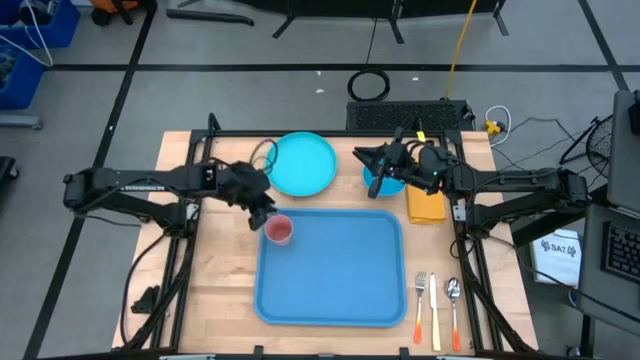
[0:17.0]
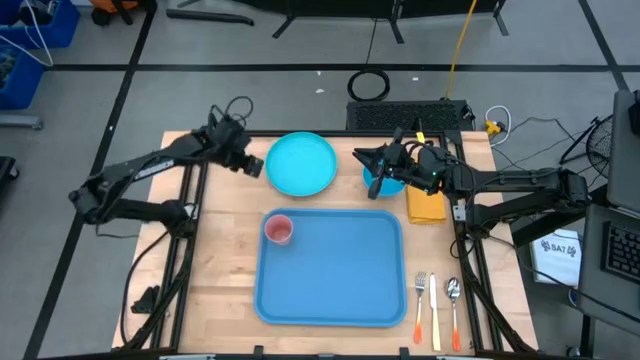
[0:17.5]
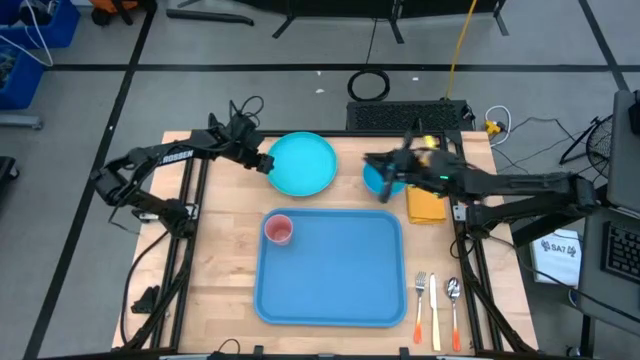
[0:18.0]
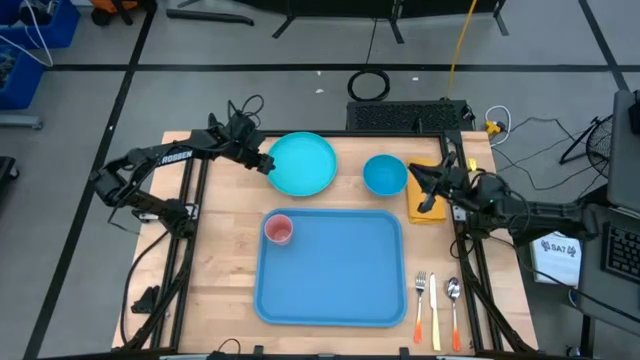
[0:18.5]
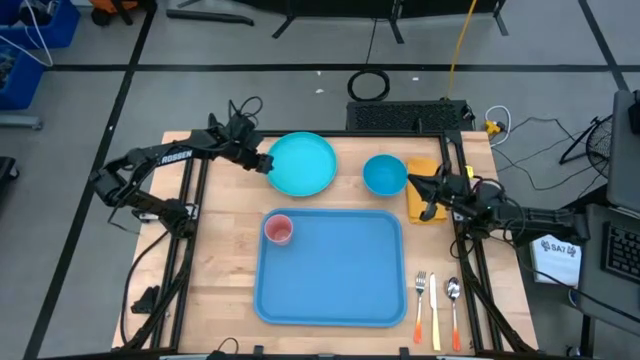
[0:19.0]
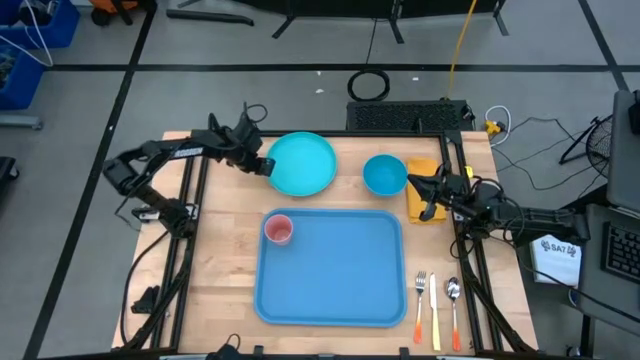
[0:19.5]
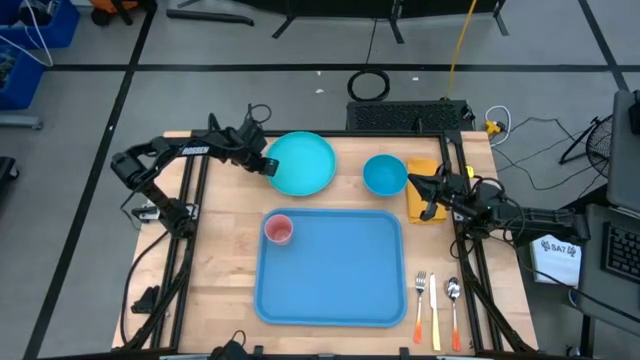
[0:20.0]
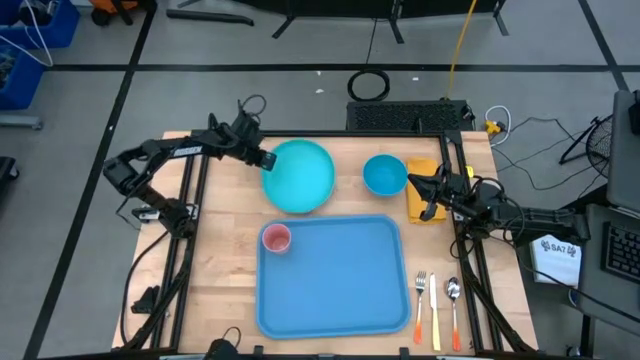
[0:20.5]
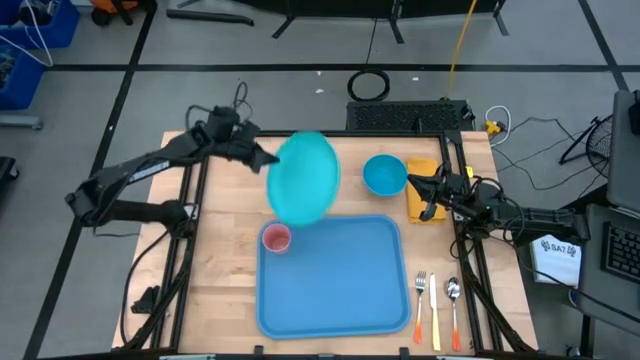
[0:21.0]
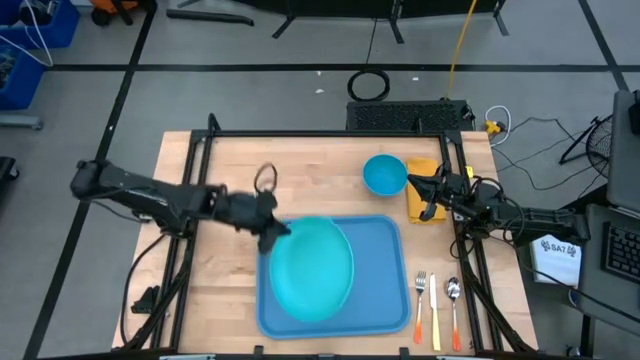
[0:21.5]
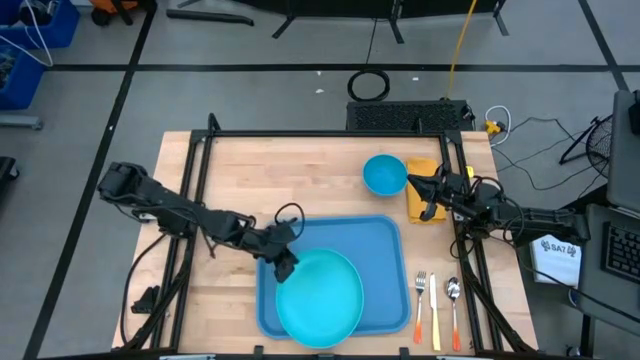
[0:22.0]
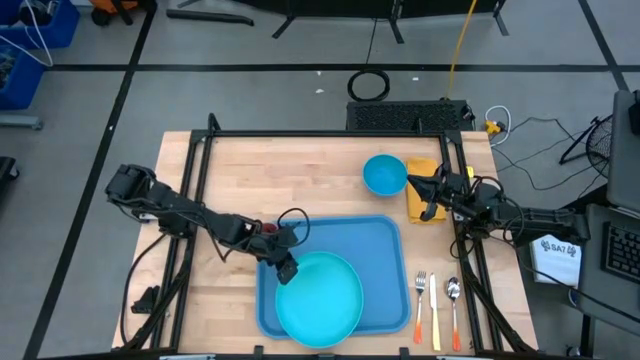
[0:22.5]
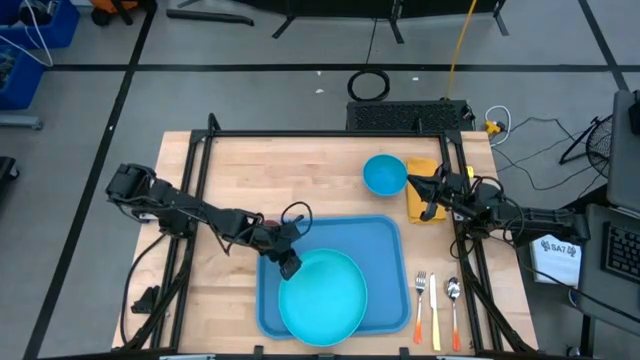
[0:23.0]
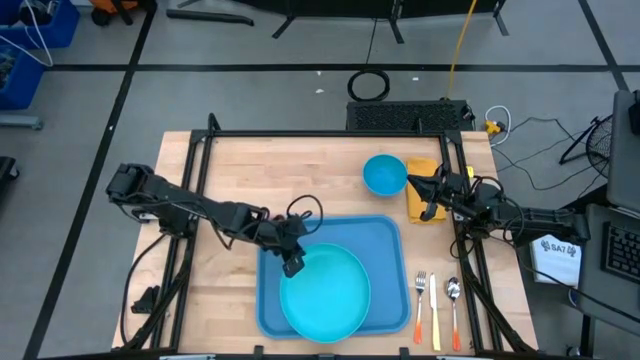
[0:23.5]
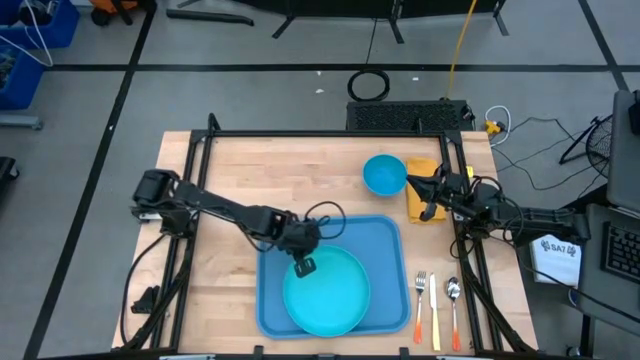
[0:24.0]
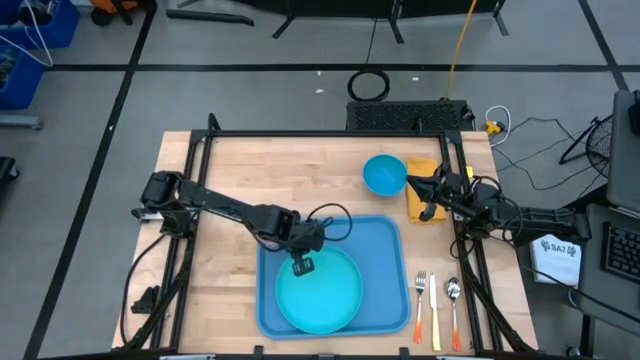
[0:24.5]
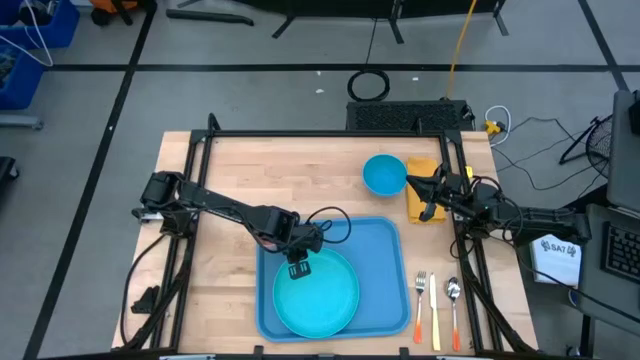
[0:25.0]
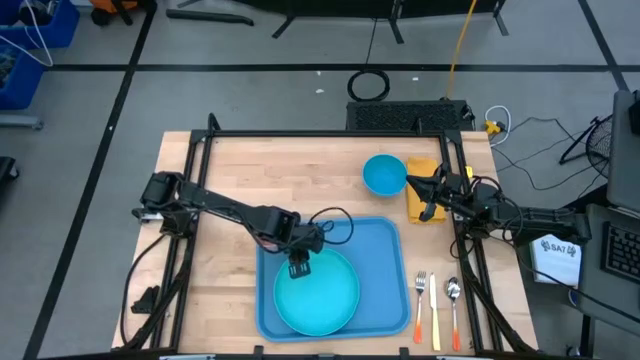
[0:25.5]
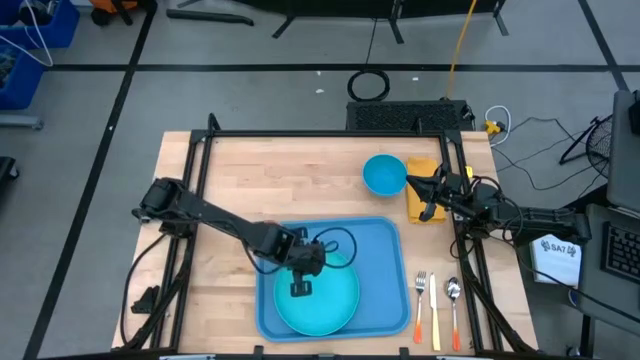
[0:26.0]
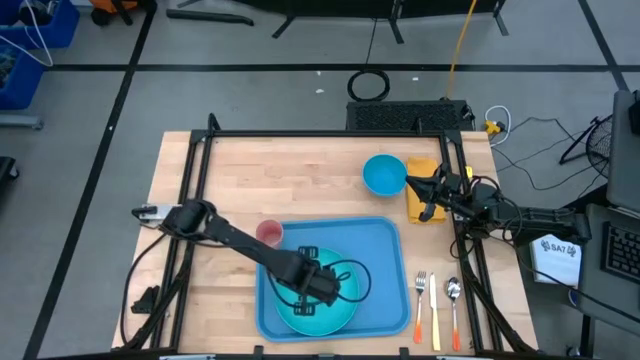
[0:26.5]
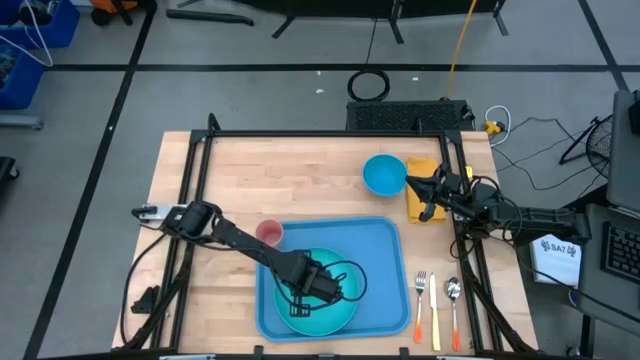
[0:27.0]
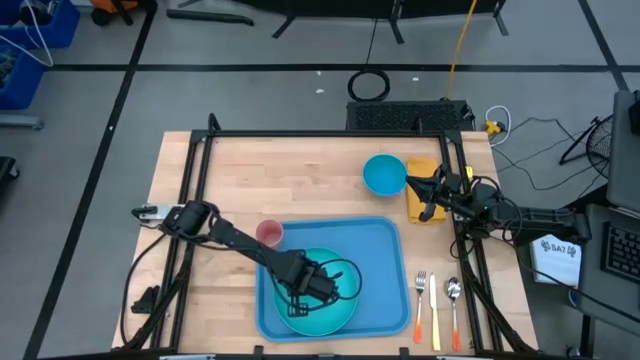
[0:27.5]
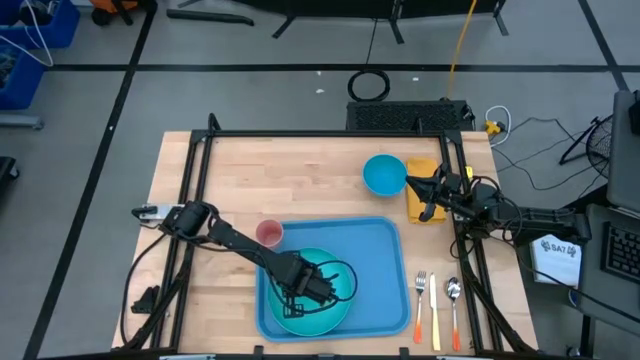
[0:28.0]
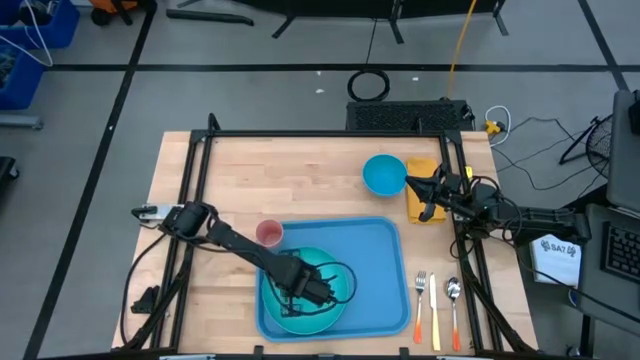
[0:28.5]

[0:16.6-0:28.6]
Task: Set up tray
Put the green plate on the serving tray to the bottom right of the pink cup

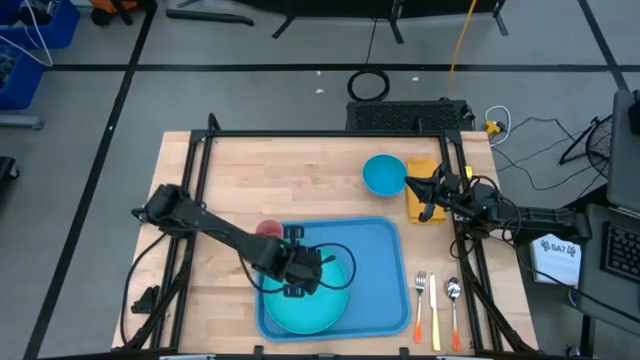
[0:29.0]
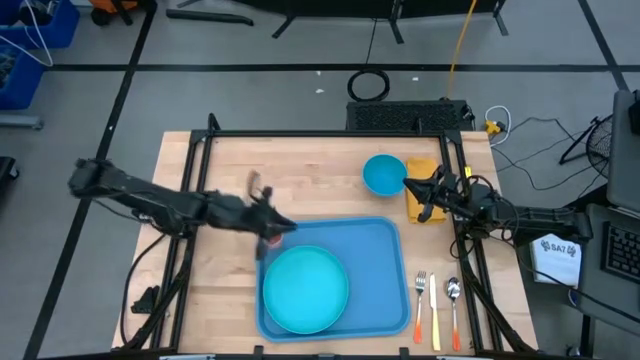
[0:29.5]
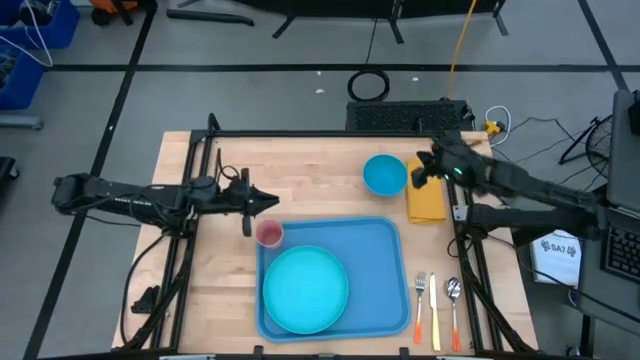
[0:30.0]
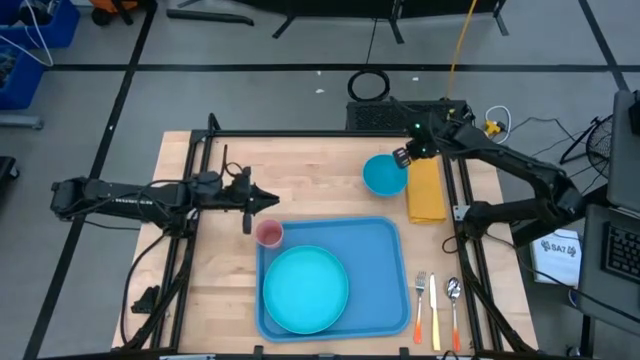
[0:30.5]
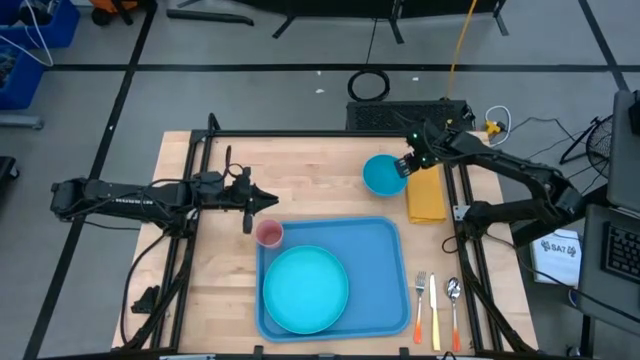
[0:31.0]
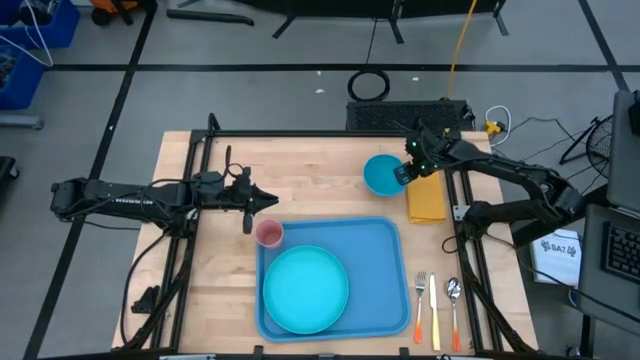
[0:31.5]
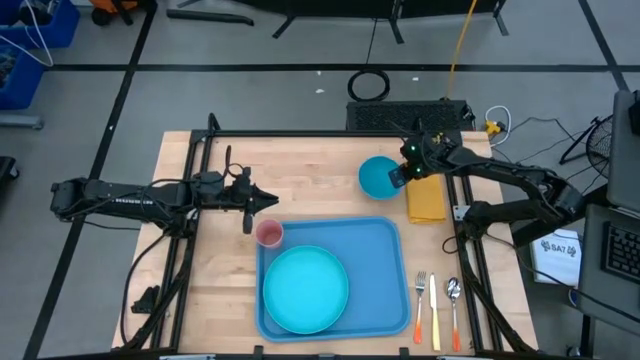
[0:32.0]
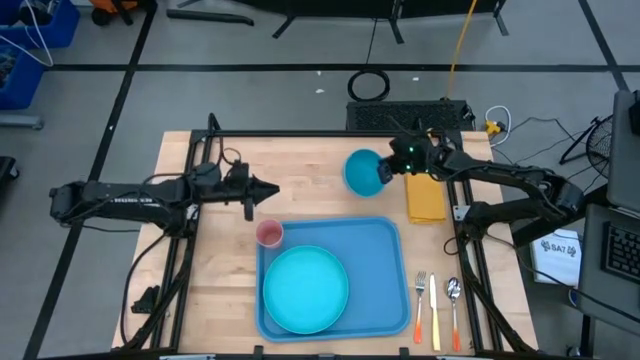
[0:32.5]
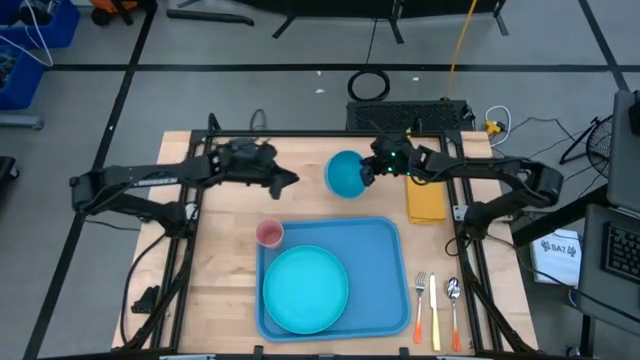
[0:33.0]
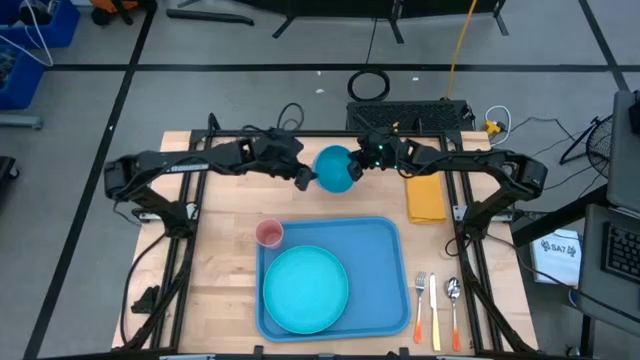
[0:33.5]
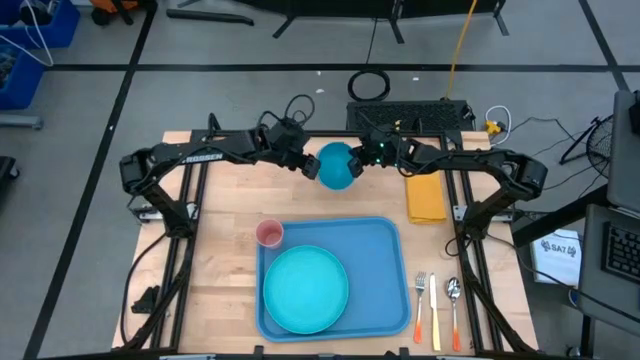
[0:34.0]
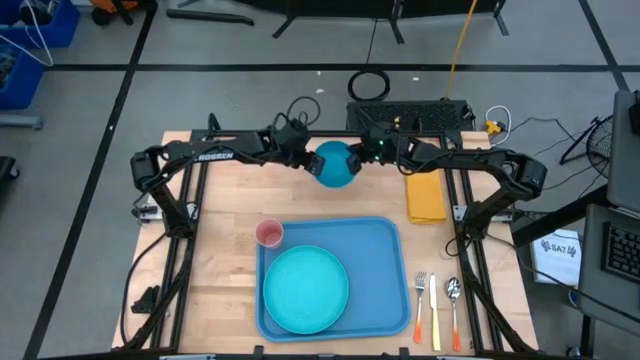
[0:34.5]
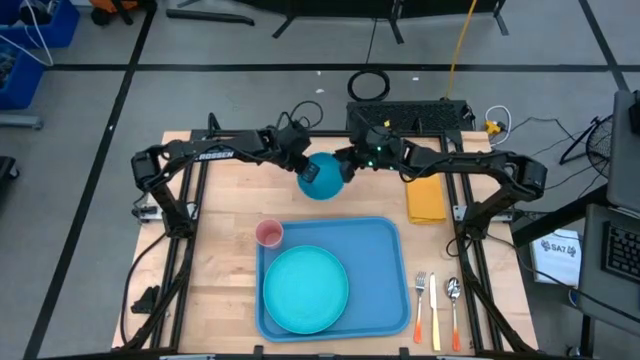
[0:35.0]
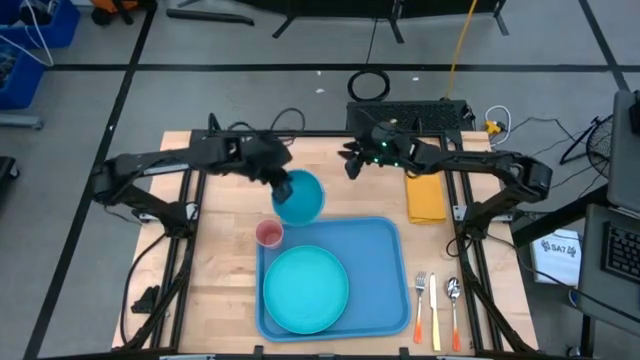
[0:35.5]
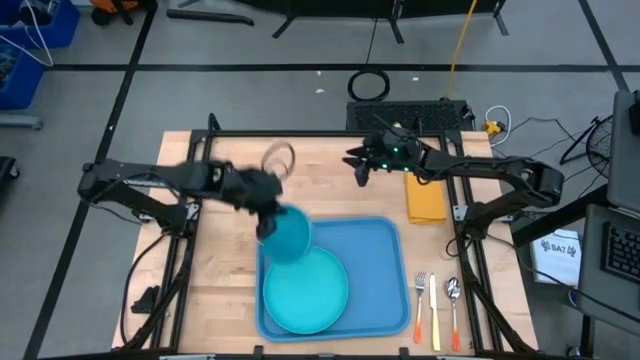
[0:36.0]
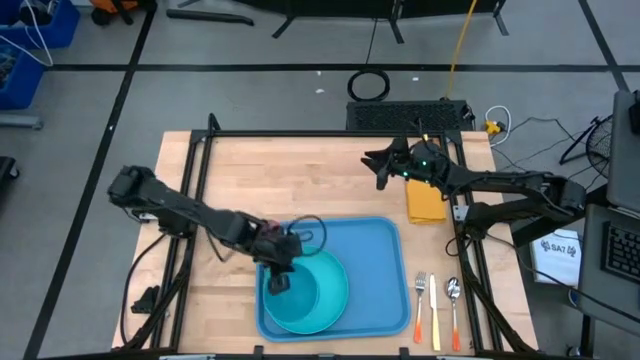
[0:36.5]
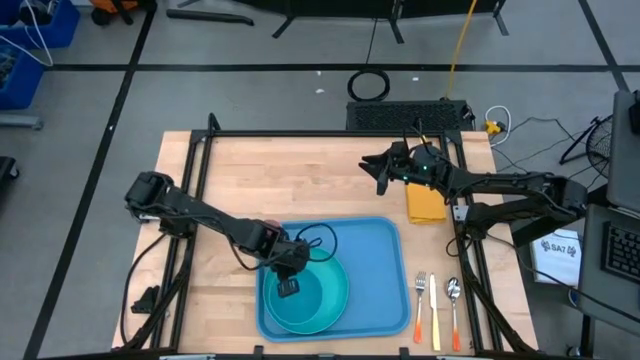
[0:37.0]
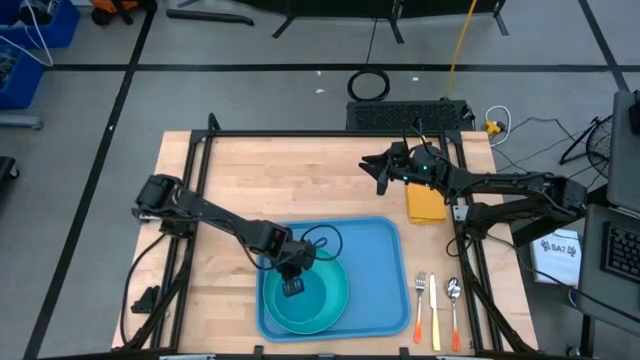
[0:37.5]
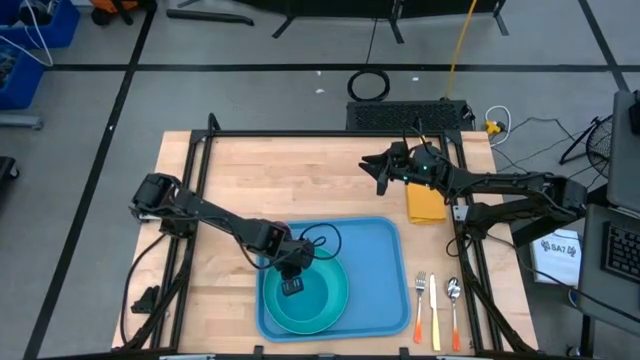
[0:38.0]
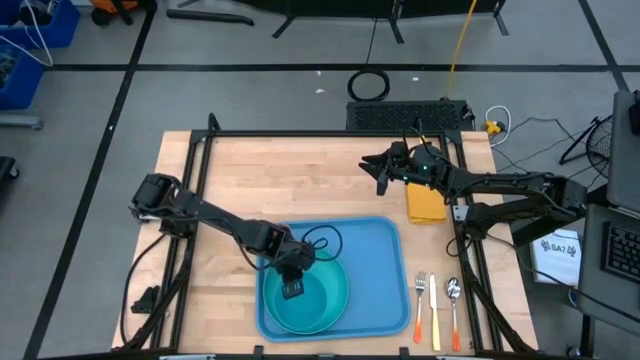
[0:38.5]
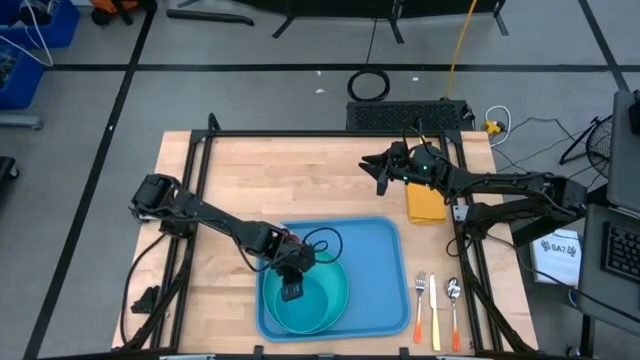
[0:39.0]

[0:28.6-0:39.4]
Put the blue bowl on top of the green plate on the serving tray
